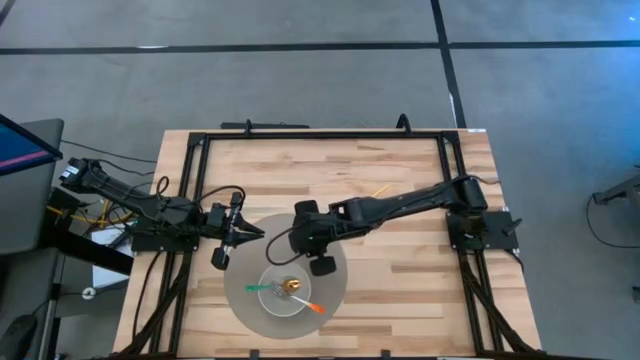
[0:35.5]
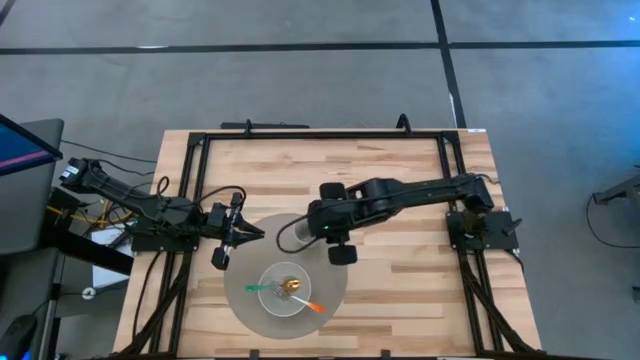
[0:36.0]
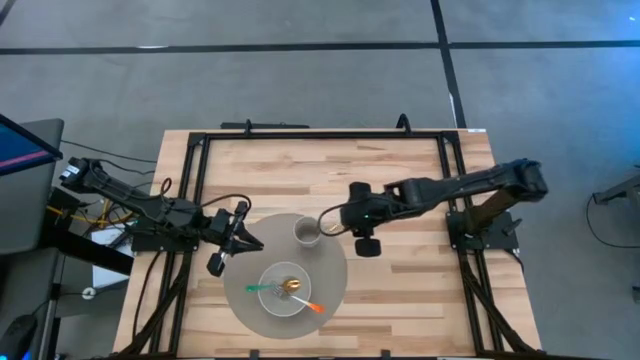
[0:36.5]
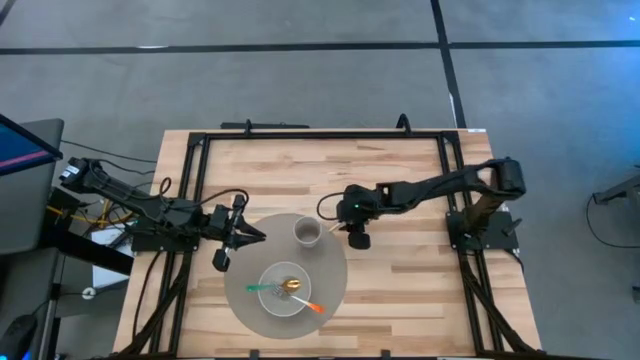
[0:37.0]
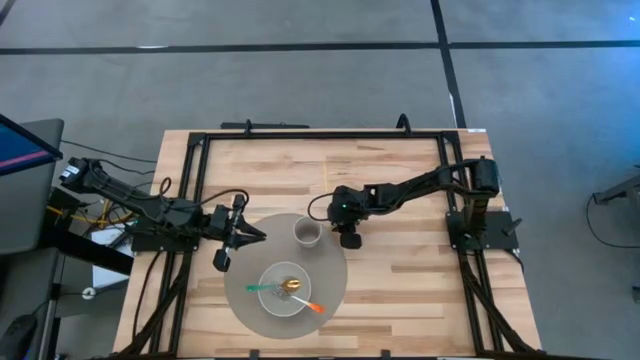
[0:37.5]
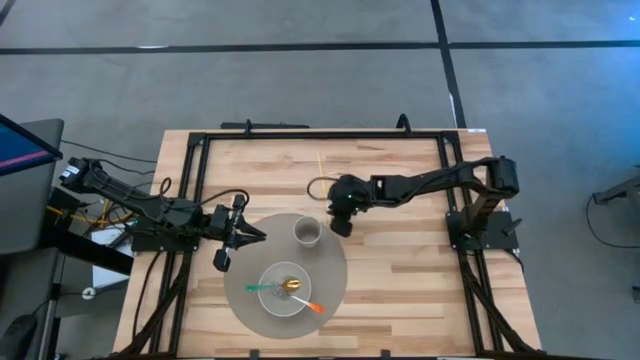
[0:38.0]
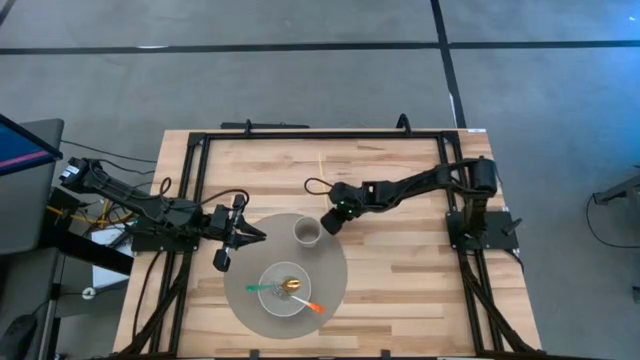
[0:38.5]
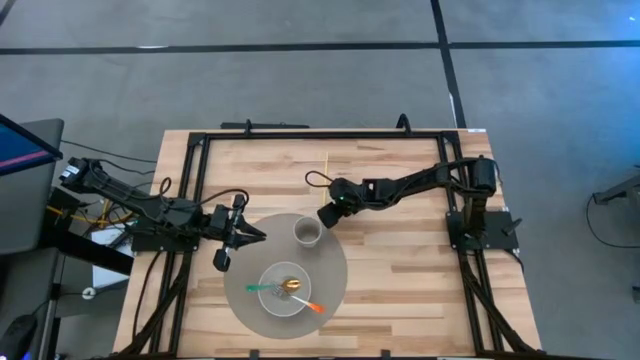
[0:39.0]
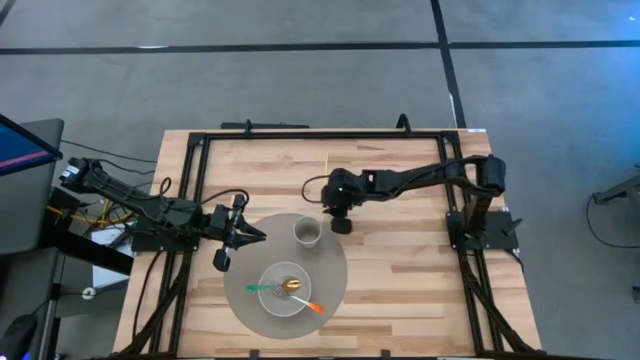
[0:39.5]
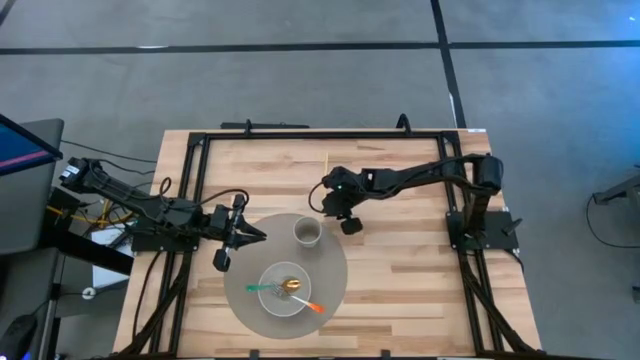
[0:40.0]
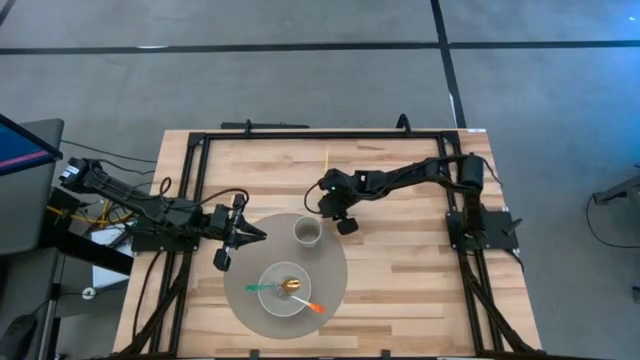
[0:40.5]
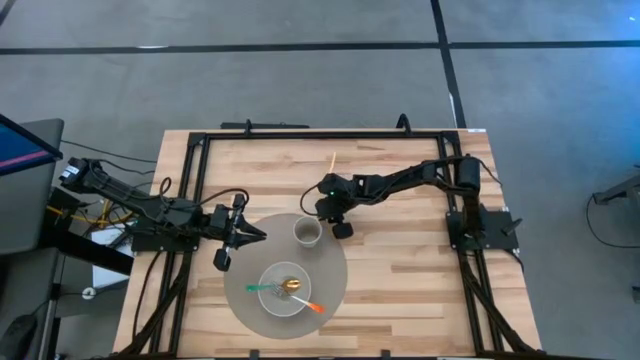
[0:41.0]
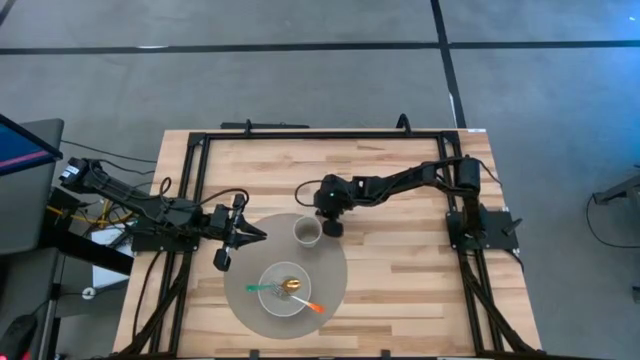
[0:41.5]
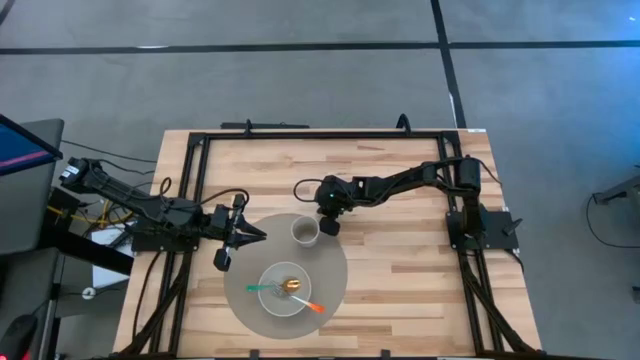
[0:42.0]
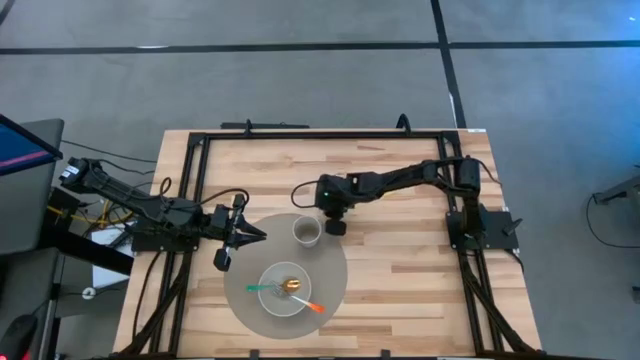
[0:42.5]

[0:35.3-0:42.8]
Task: Pick & Place Utensil
Put the yellow straw into the white cup on the mat

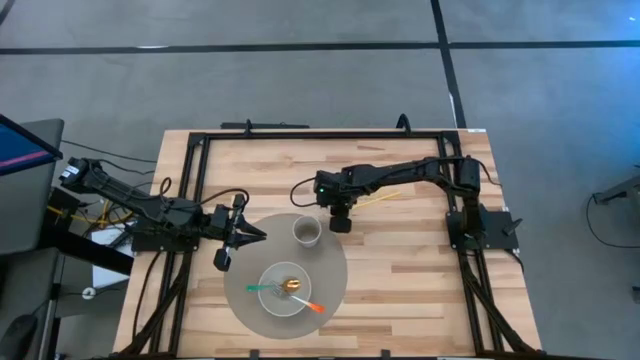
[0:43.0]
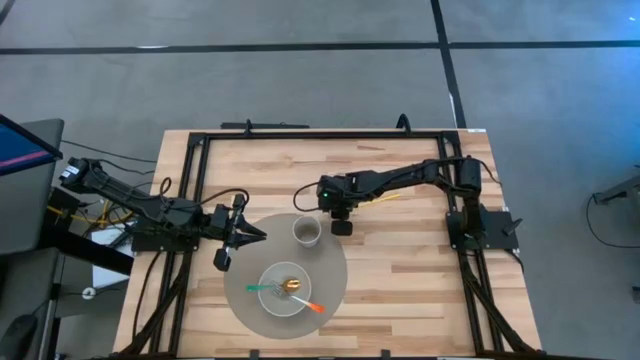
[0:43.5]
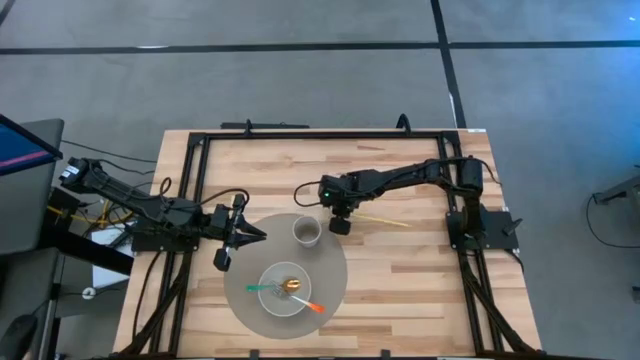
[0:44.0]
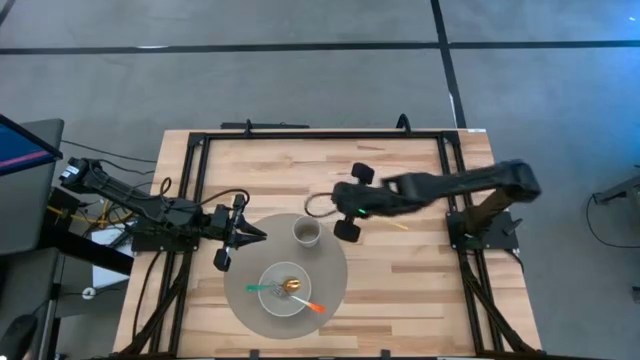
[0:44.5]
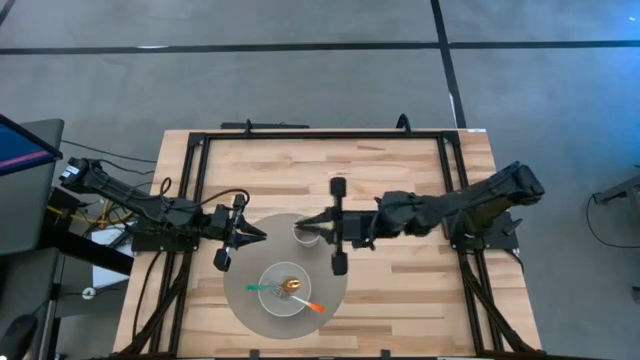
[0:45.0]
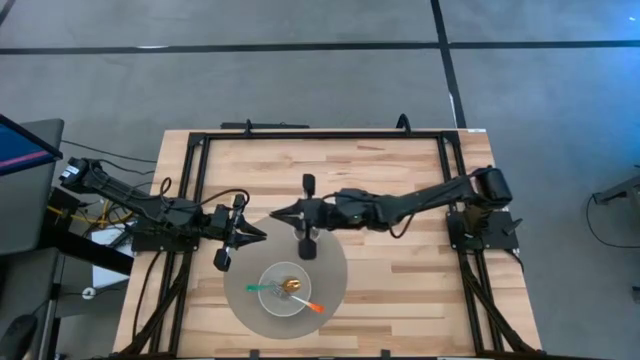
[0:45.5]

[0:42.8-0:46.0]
Put the yellow straw into the white cup on the mat

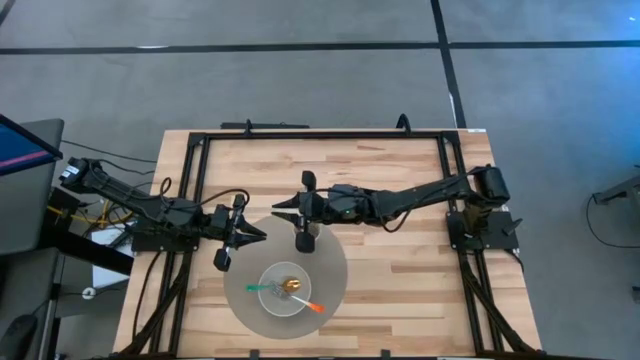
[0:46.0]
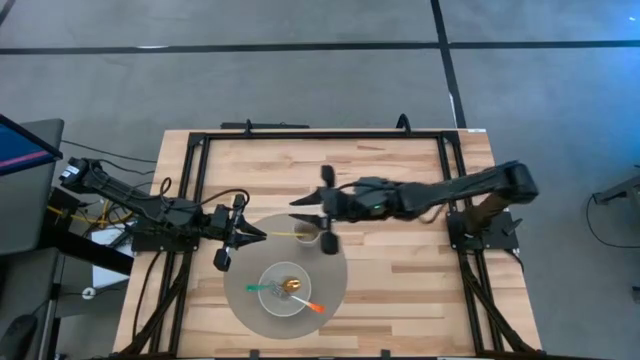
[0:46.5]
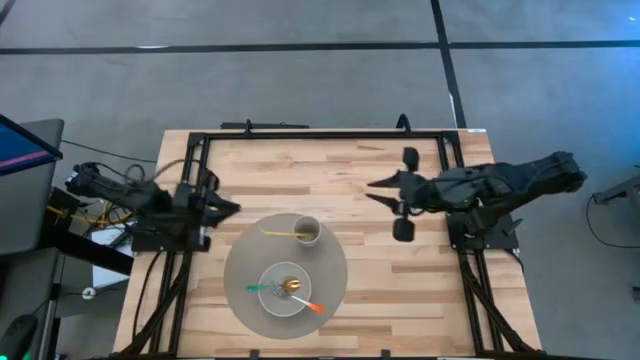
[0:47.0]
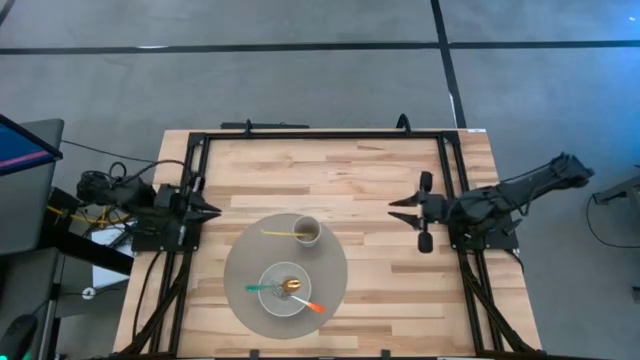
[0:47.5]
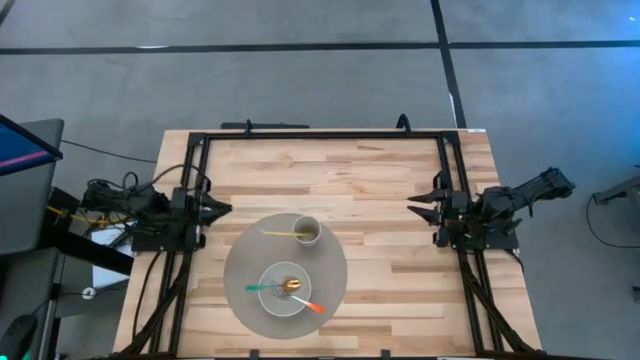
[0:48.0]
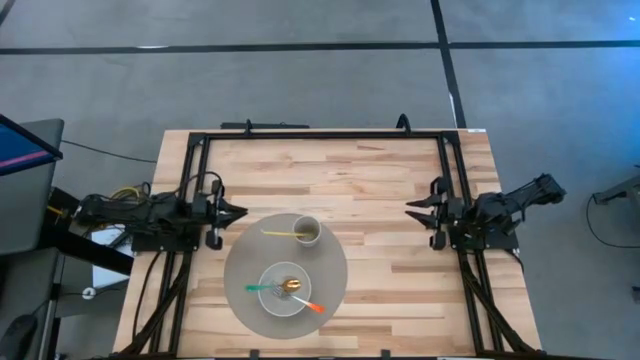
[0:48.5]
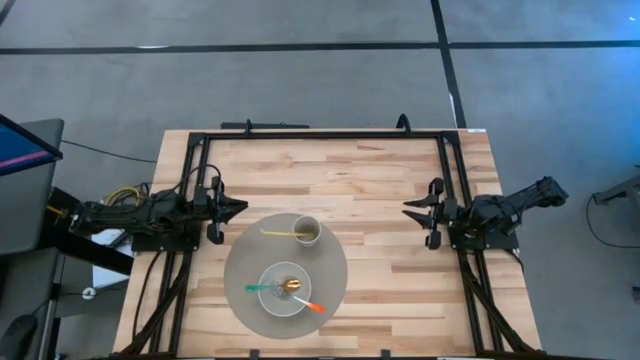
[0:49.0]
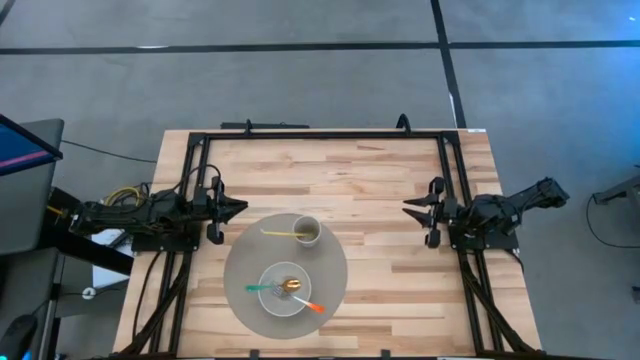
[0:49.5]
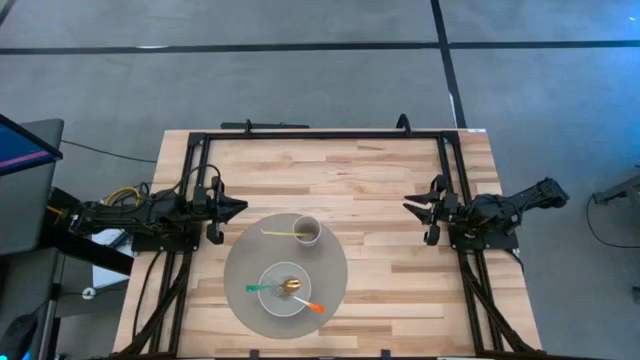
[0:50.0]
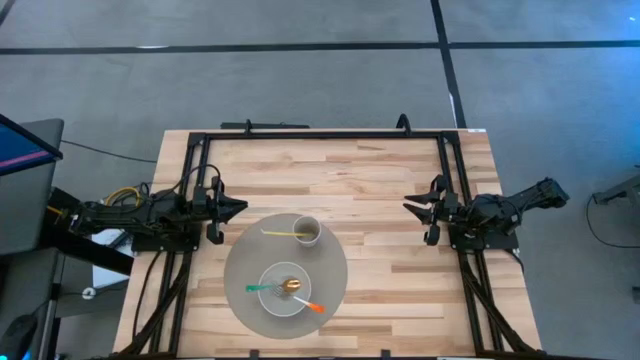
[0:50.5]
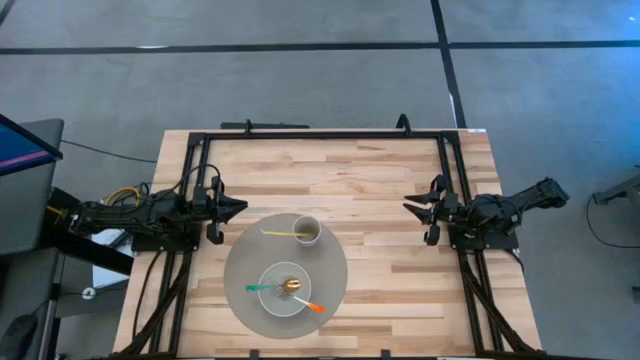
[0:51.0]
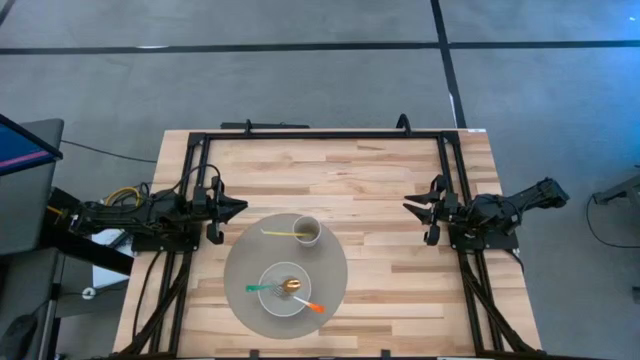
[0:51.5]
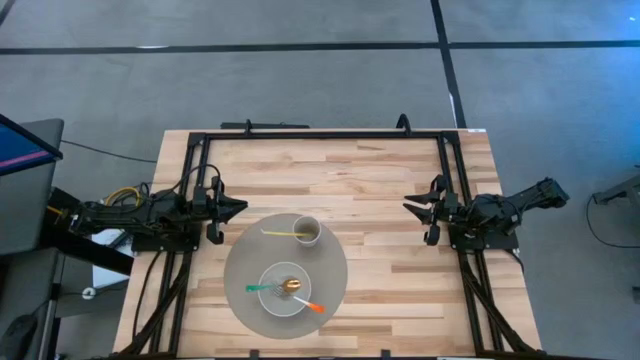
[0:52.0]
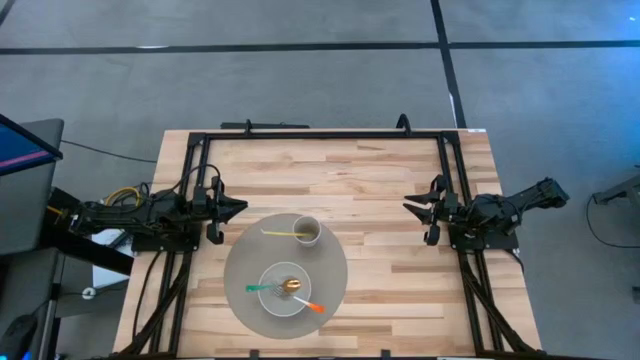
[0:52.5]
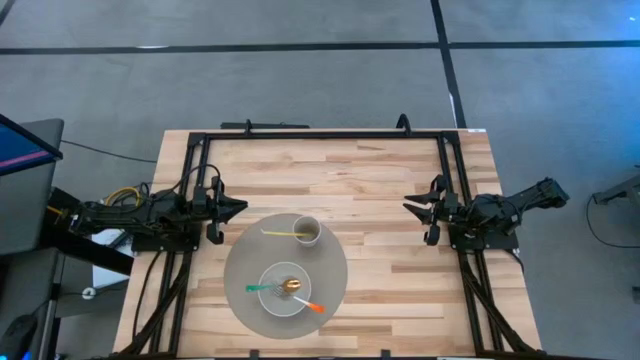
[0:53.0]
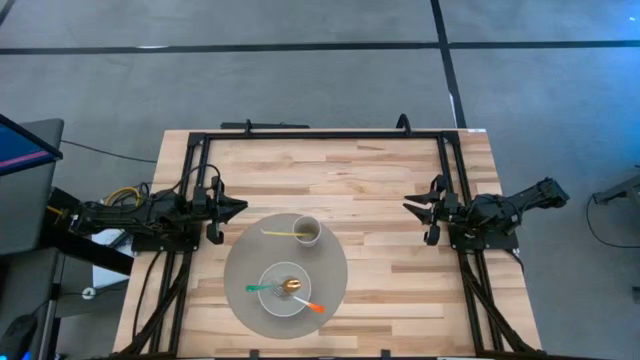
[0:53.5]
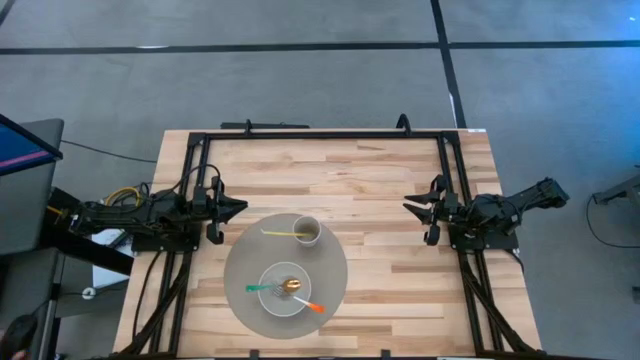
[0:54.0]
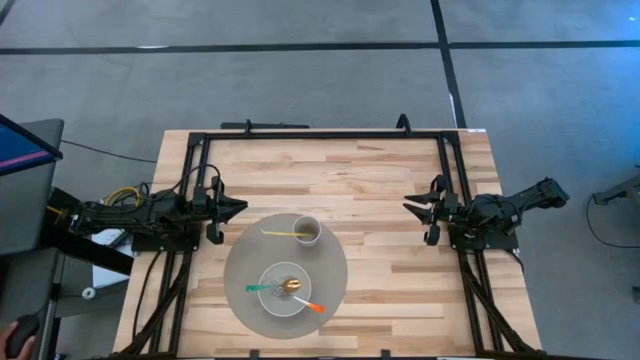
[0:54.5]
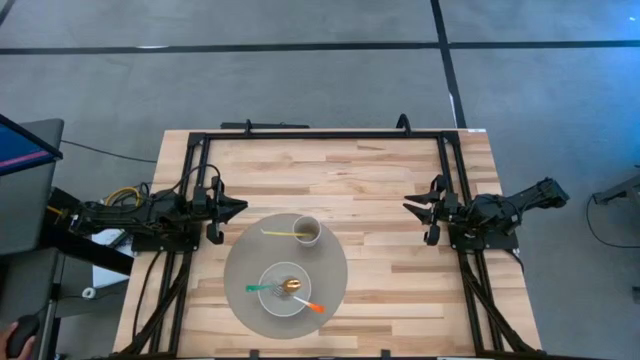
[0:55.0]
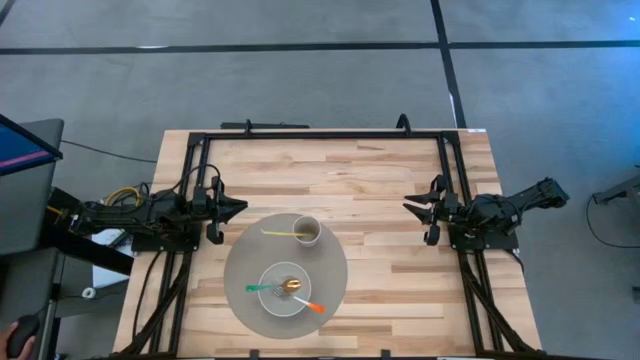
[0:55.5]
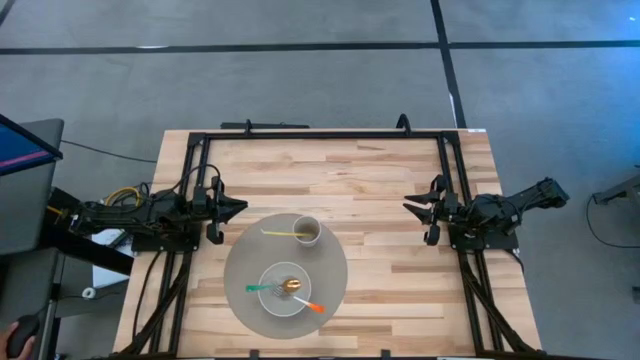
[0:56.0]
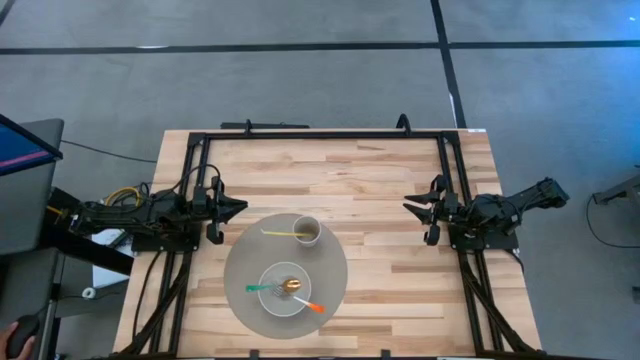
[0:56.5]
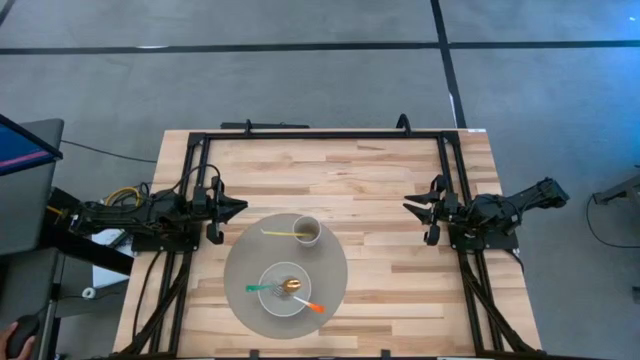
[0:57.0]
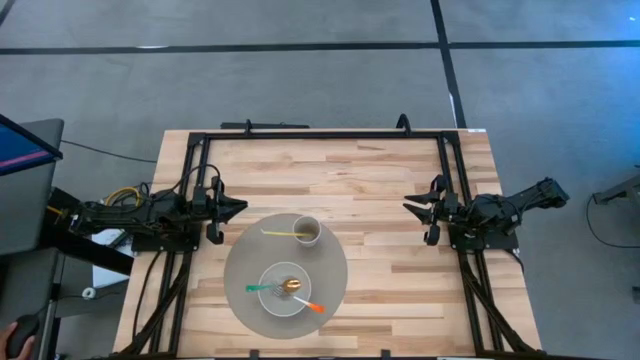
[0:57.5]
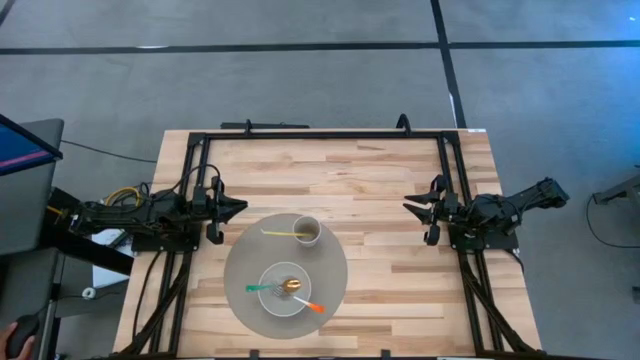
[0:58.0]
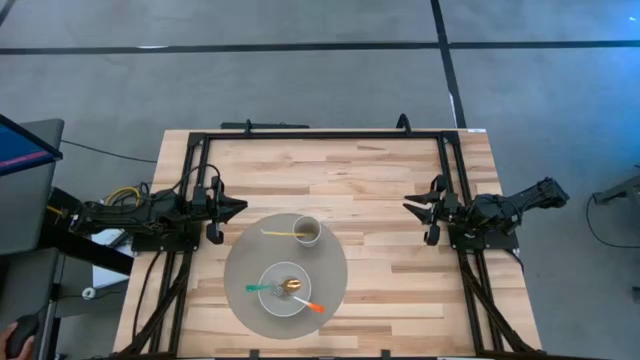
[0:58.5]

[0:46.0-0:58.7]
Return to Home Position
